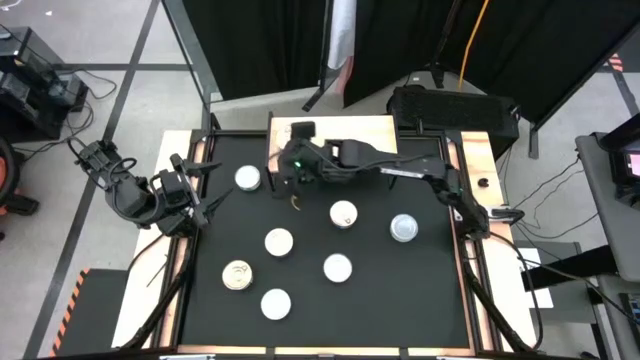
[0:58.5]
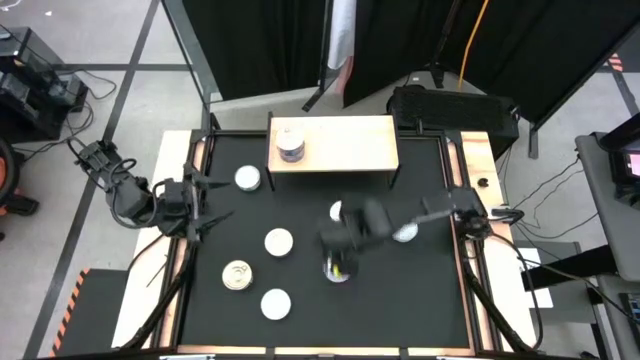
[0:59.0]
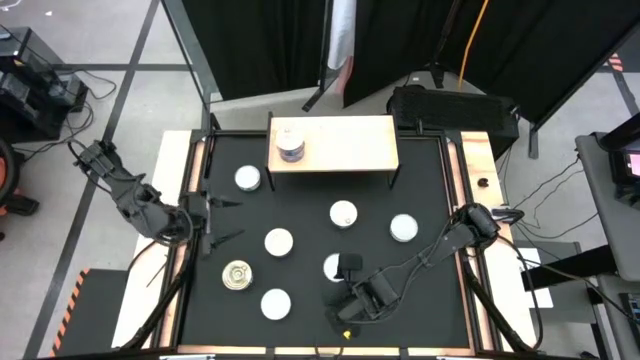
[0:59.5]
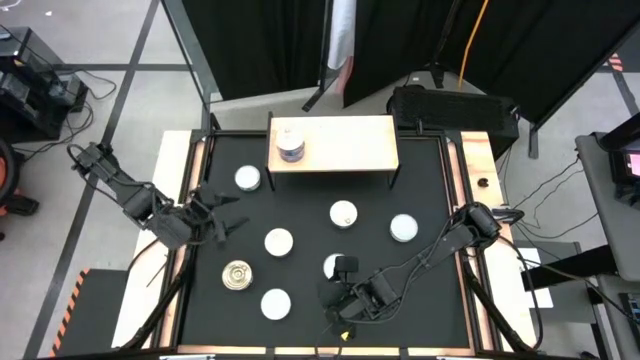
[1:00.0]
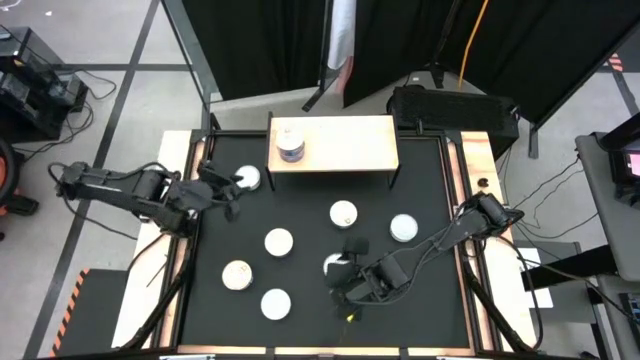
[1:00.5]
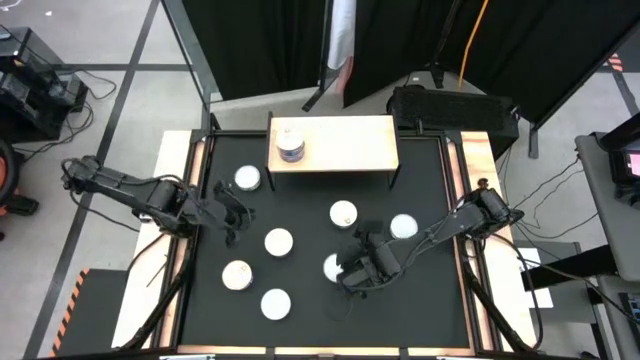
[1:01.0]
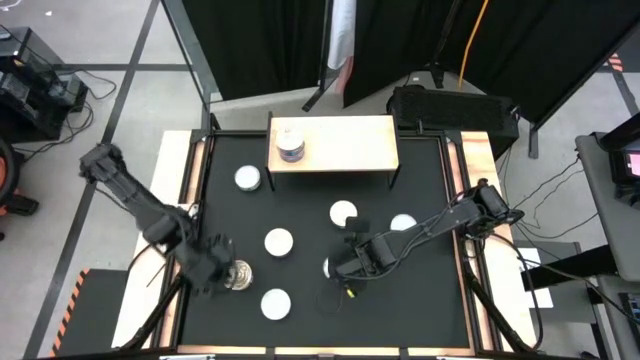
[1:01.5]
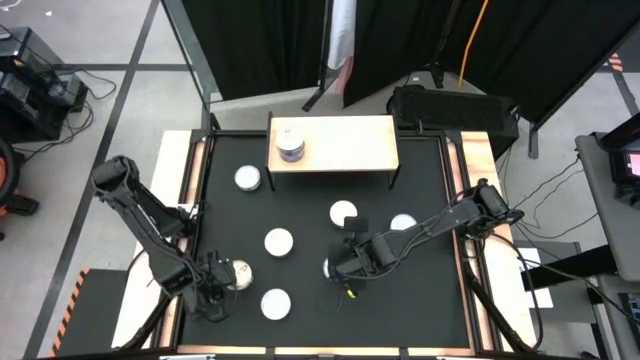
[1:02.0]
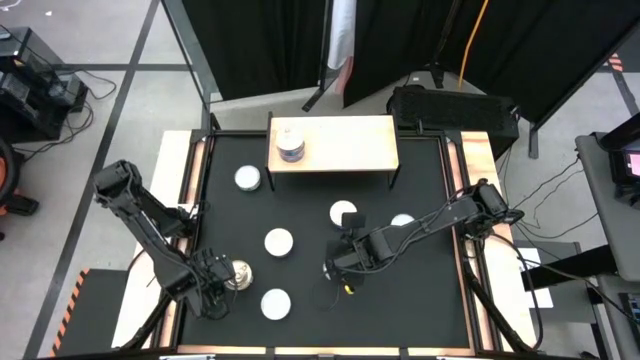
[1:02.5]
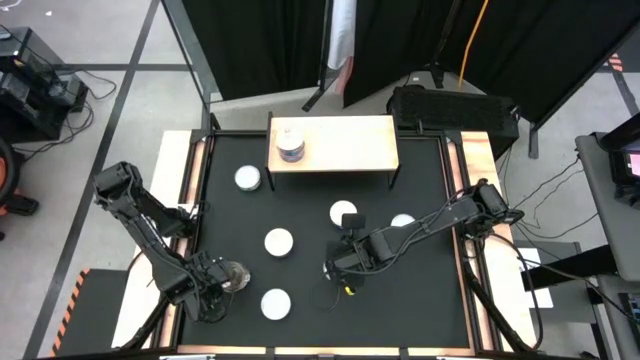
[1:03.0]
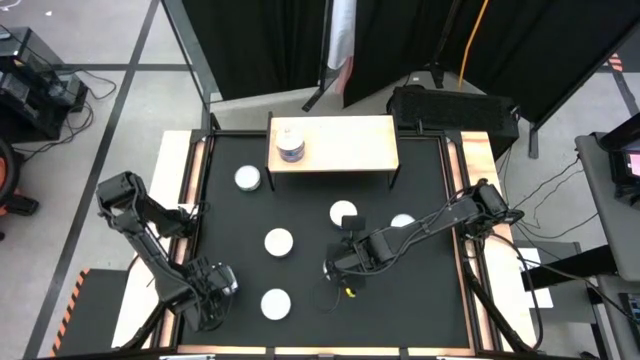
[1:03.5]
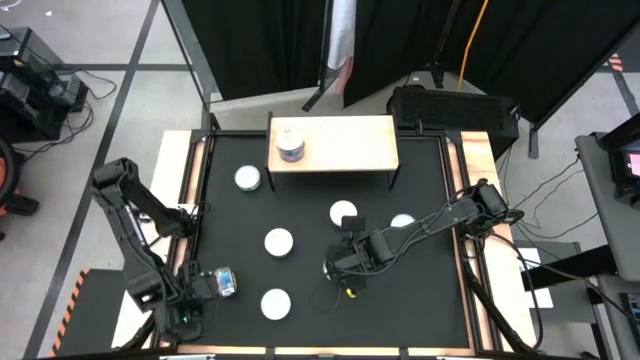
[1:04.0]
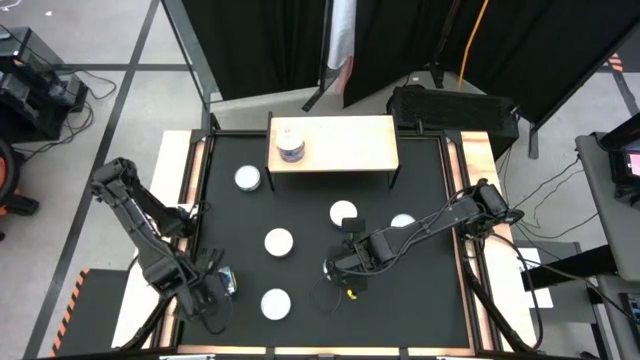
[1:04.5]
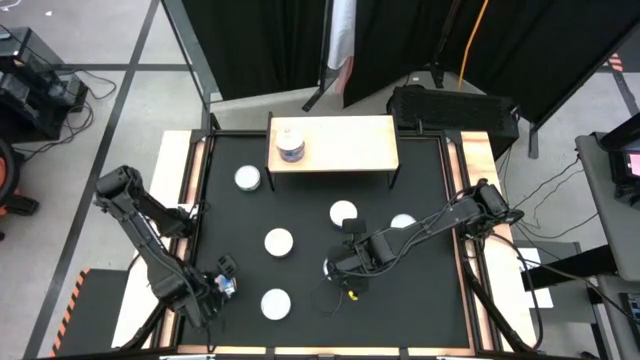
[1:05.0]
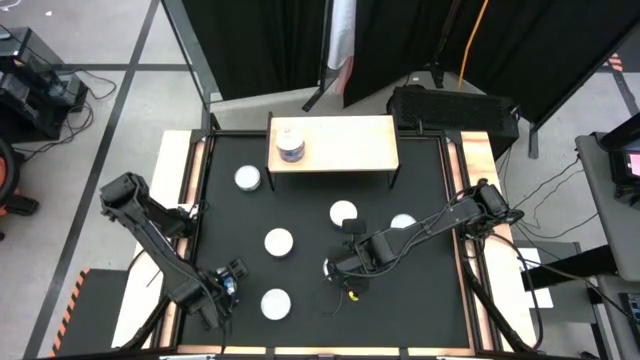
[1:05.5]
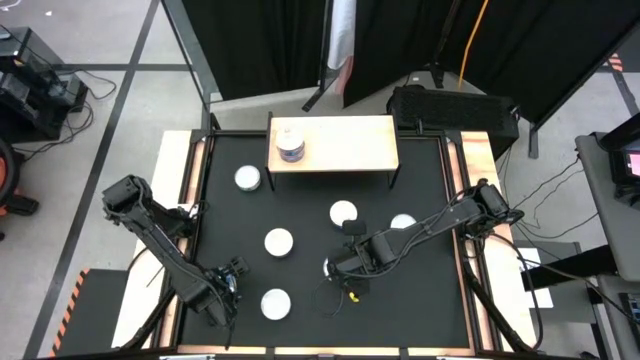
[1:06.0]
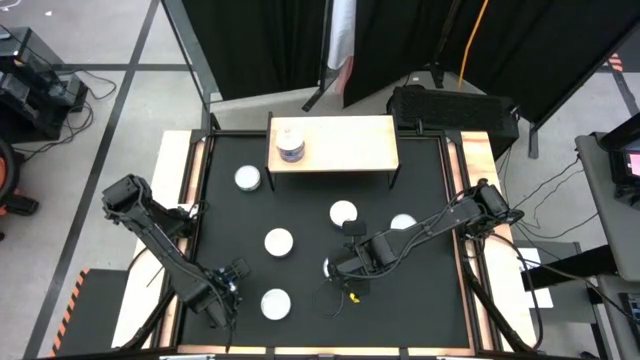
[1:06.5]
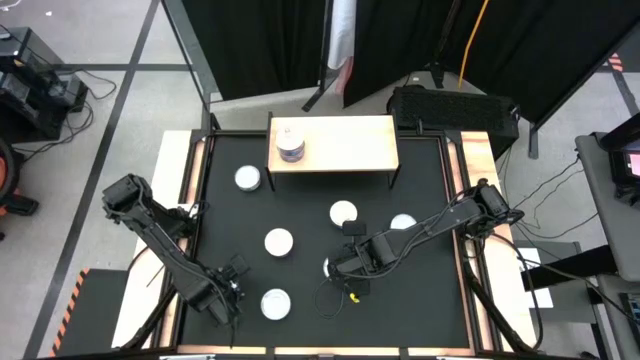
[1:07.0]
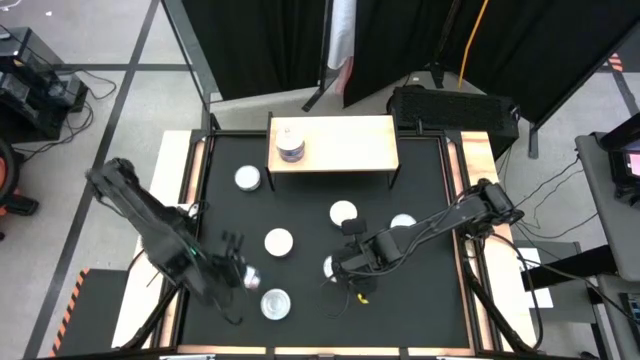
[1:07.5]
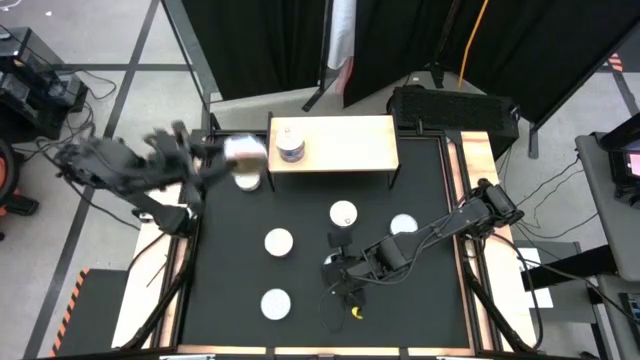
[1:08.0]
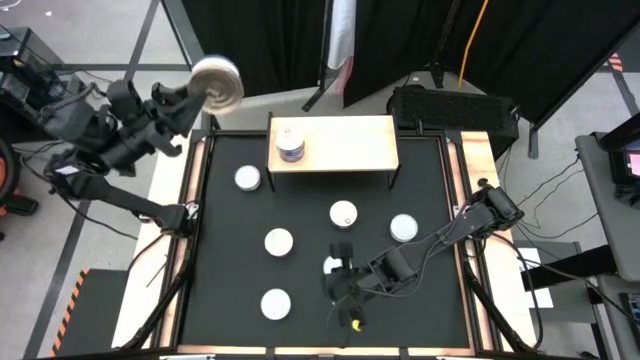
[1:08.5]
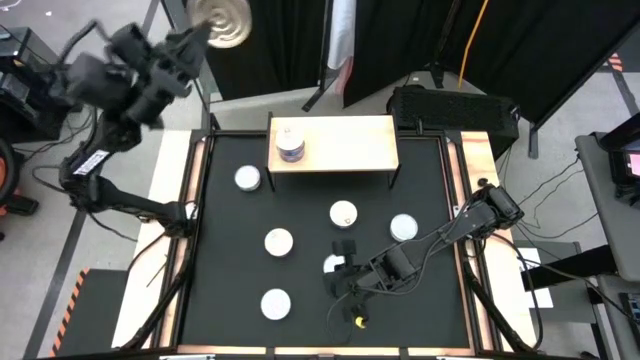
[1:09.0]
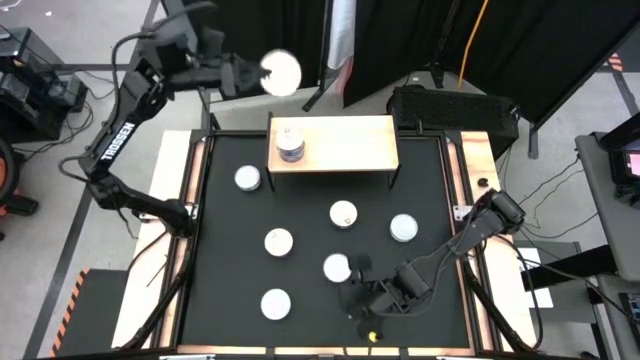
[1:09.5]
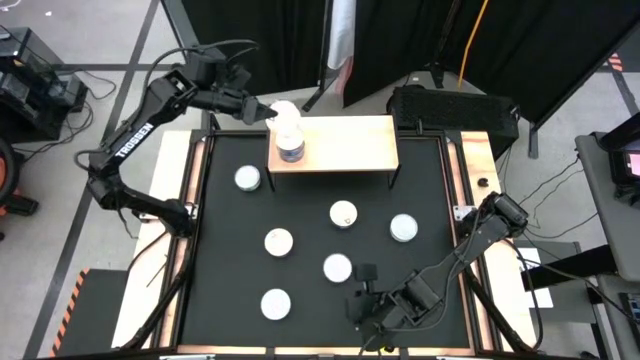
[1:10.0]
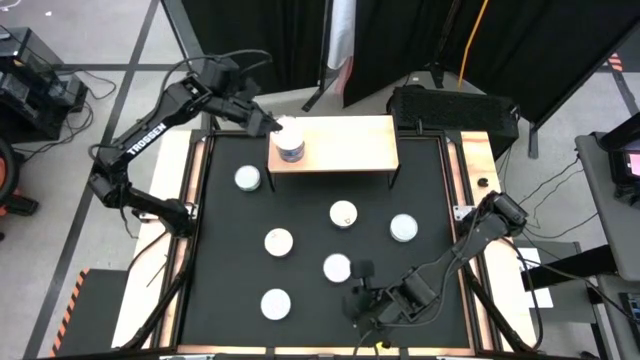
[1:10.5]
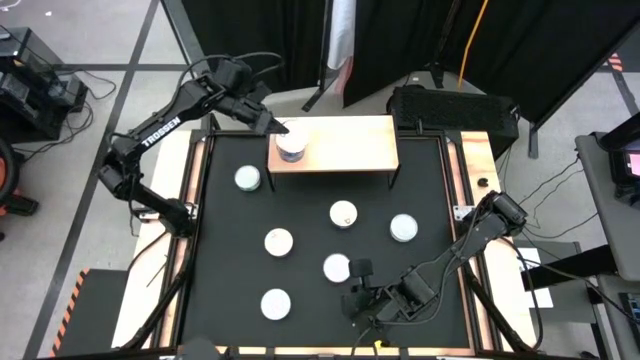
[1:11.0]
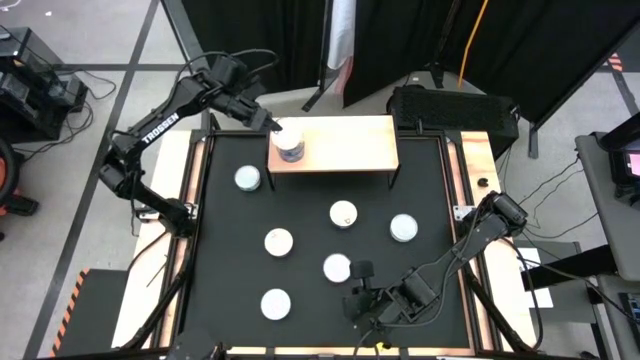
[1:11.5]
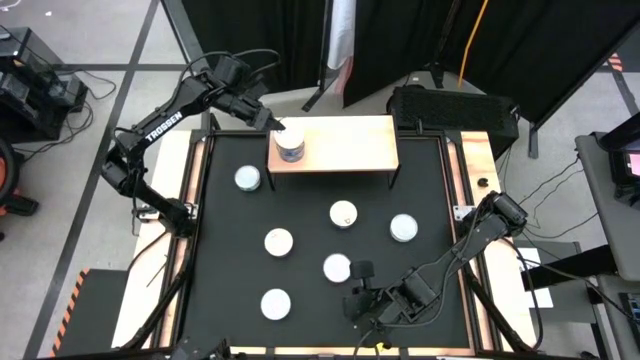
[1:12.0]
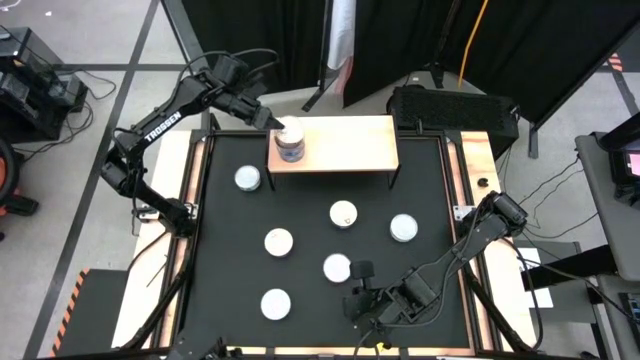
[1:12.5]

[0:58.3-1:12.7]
Task: Stack canned seafood by type on shelf
Stack the blue pink tuna can on top of the other blue pink tuna can on the shelf

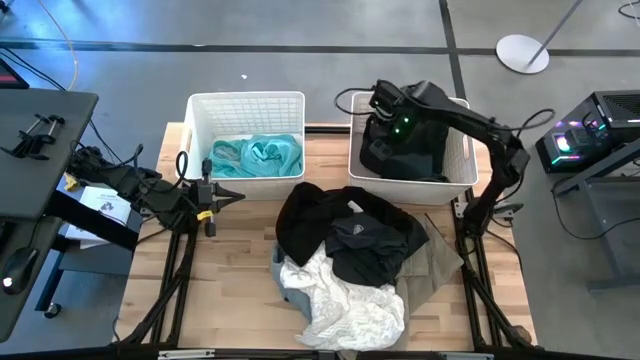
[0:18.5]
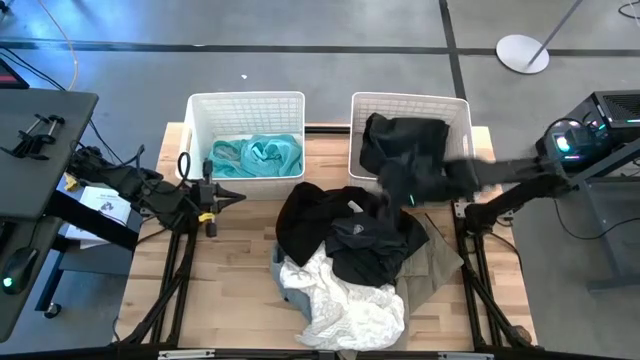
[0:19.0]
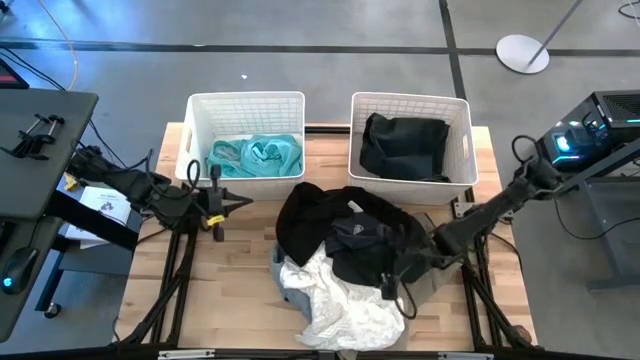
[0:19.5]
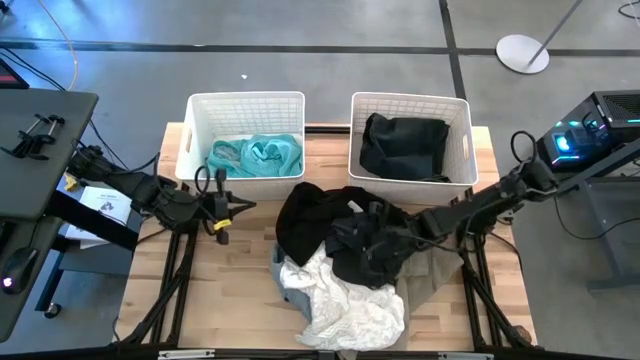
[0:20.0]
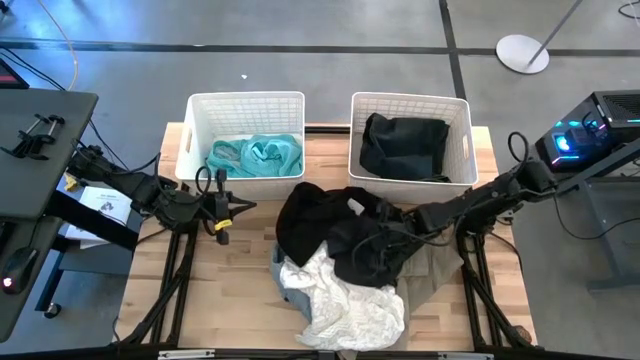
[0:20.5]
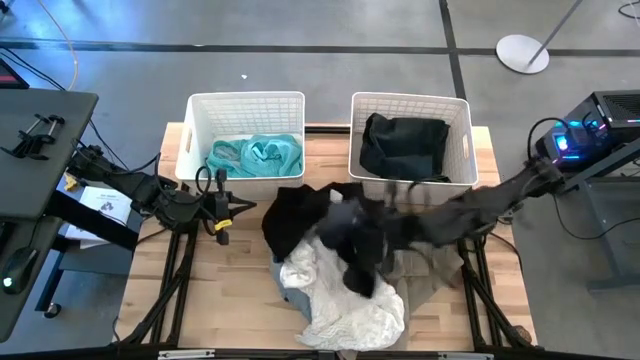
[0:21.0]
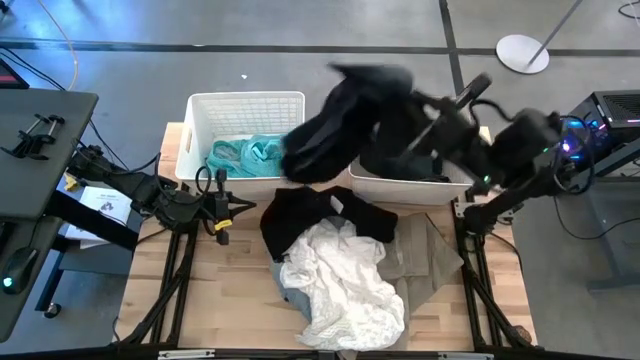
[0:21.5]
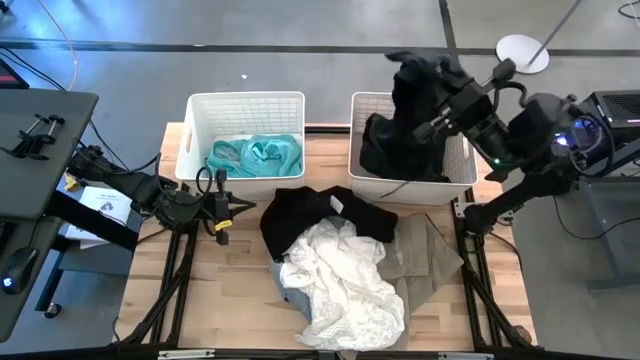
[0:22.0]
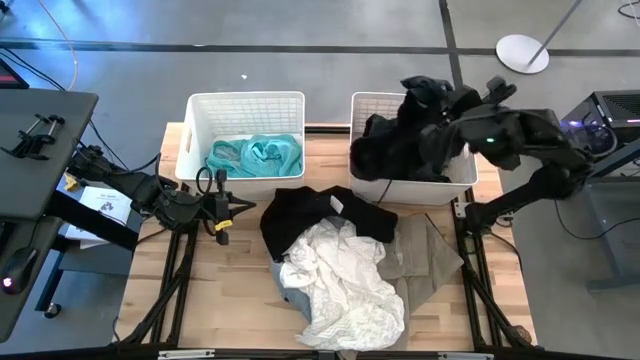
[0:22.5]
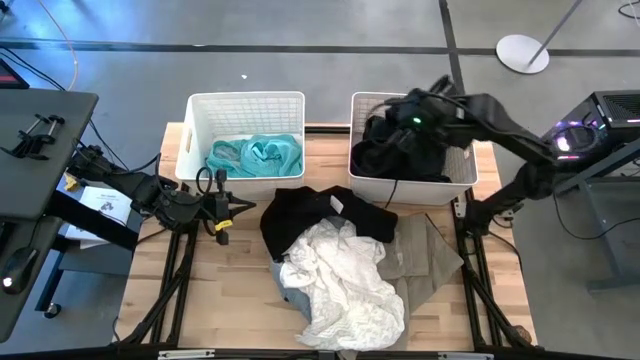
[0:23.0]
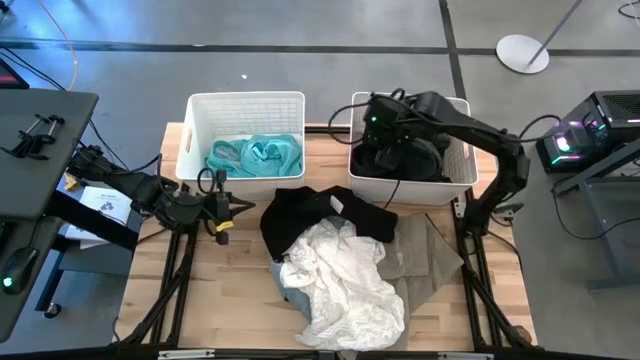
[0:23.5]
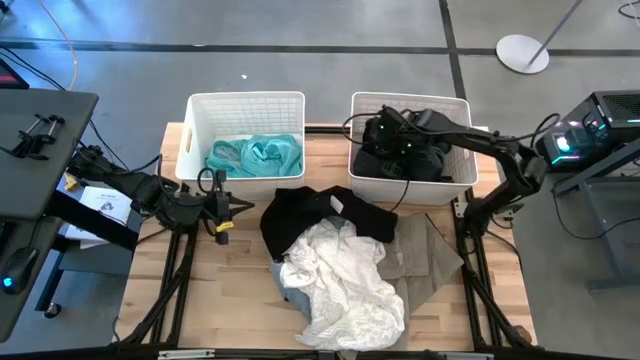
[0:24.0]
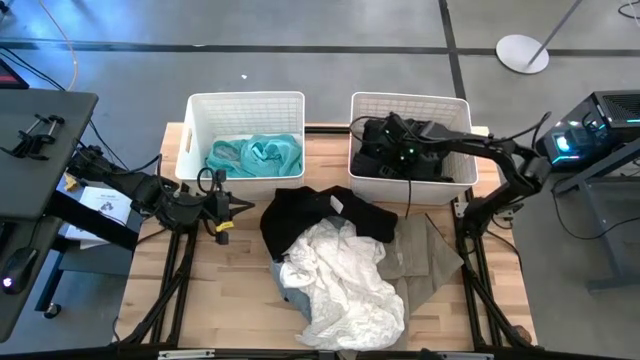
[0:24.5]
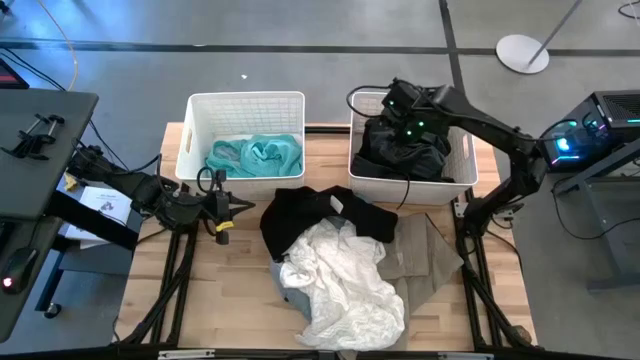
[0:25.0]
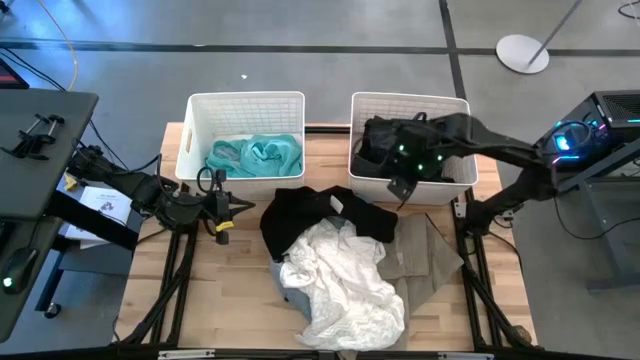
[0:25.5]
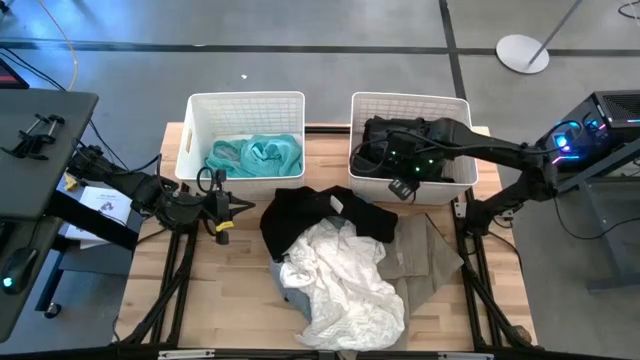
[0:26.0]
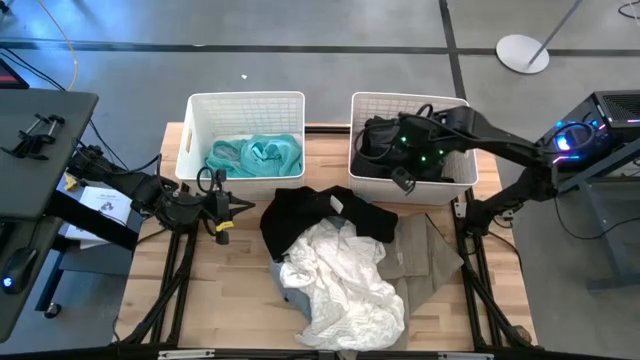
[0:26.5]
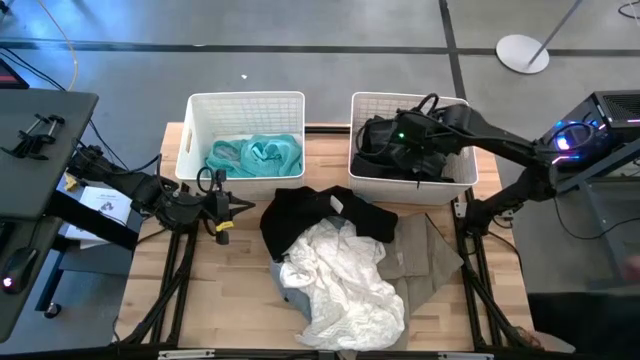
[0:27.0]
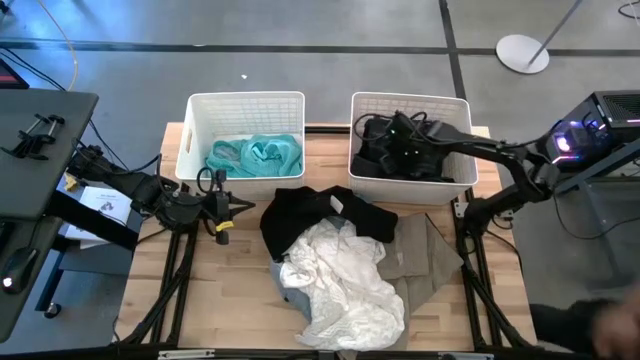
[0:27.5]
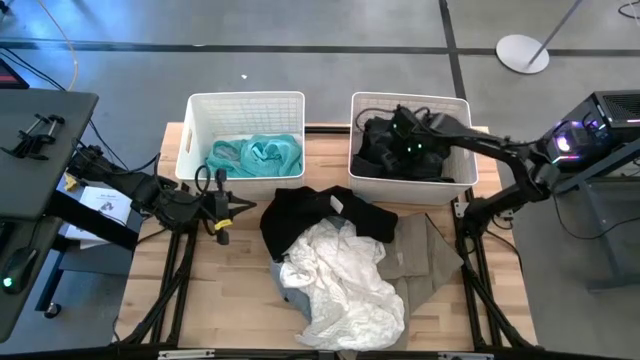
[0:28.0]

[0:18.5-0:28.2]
Task: Sort clothes
Put the dark blue shorts into the right white laundry bin
